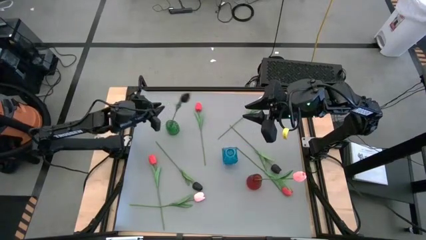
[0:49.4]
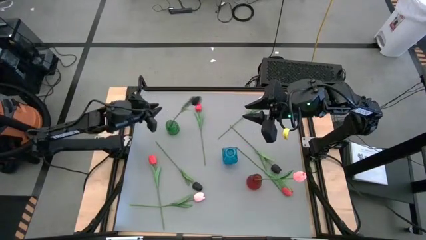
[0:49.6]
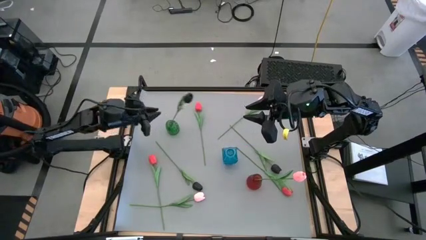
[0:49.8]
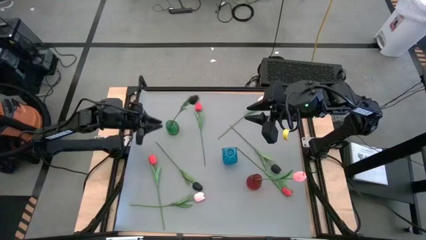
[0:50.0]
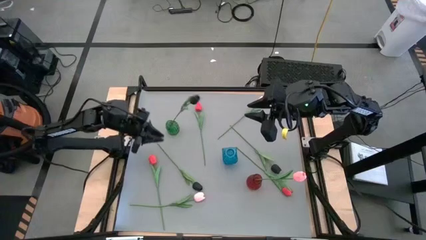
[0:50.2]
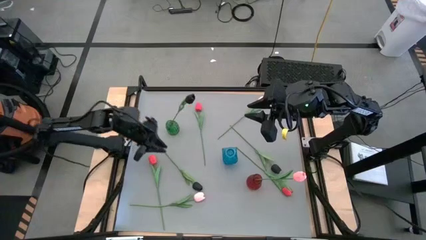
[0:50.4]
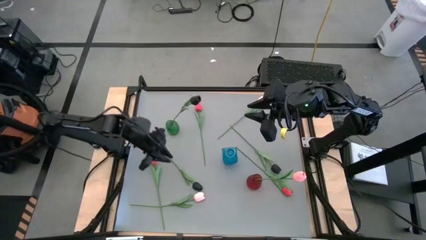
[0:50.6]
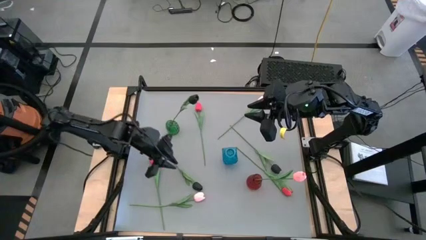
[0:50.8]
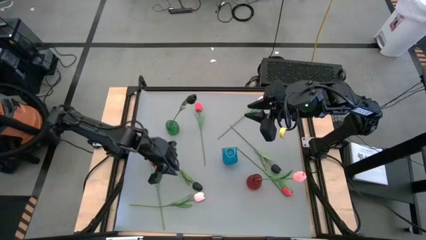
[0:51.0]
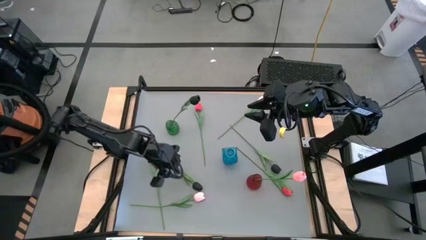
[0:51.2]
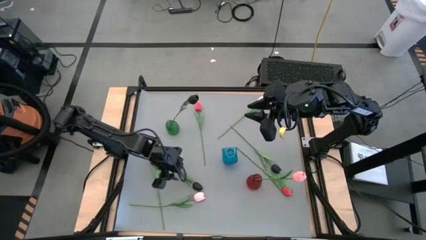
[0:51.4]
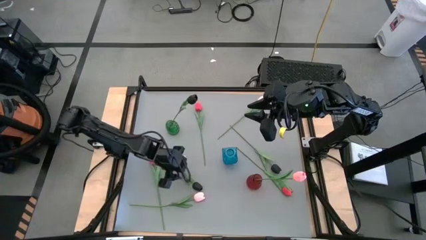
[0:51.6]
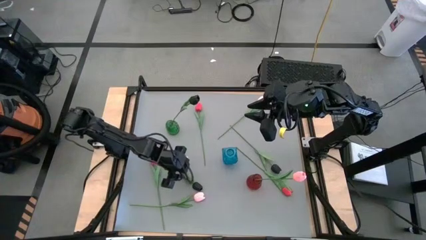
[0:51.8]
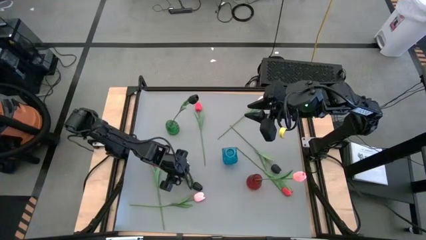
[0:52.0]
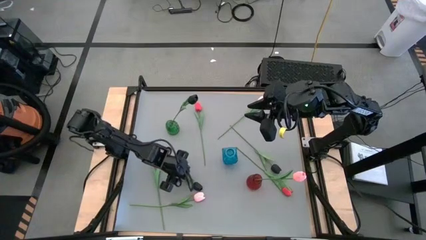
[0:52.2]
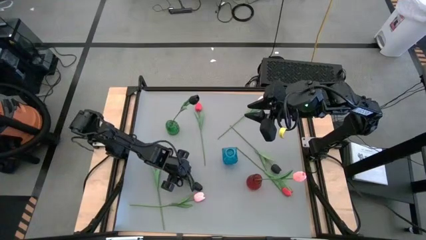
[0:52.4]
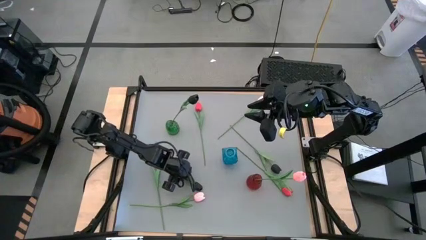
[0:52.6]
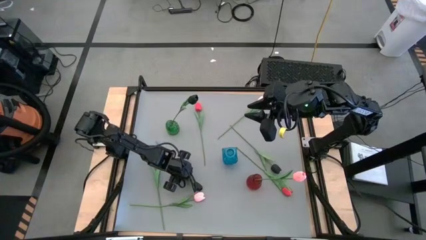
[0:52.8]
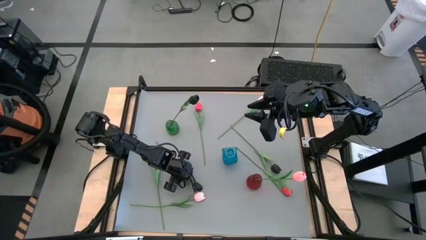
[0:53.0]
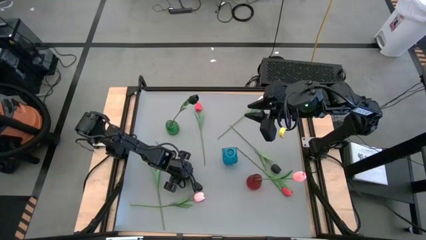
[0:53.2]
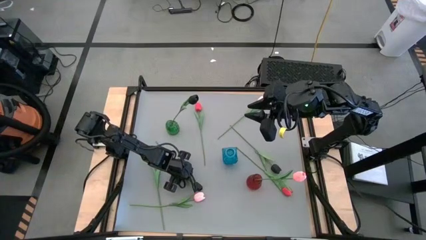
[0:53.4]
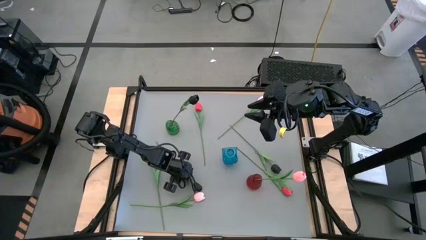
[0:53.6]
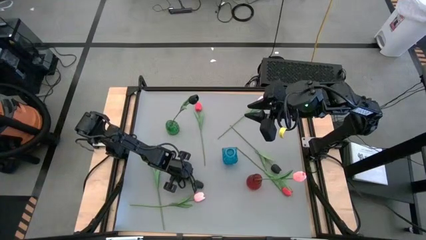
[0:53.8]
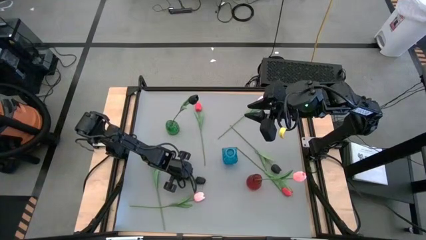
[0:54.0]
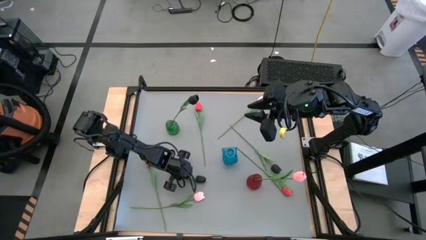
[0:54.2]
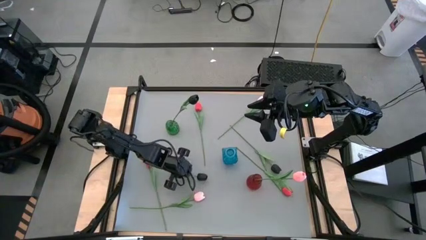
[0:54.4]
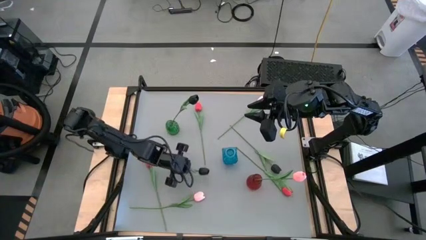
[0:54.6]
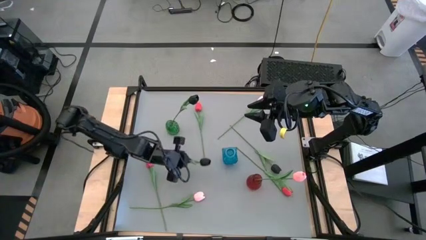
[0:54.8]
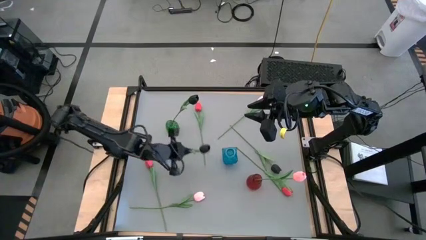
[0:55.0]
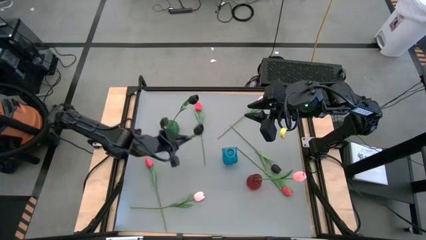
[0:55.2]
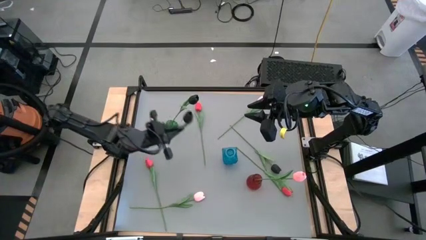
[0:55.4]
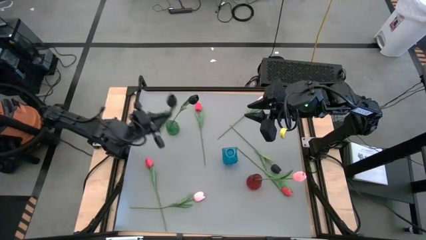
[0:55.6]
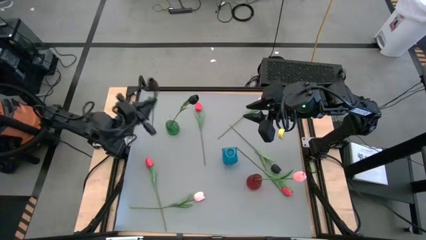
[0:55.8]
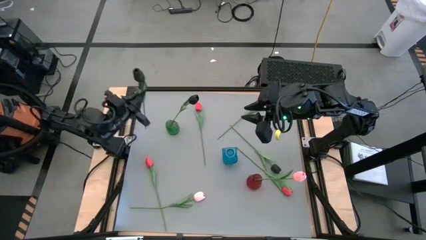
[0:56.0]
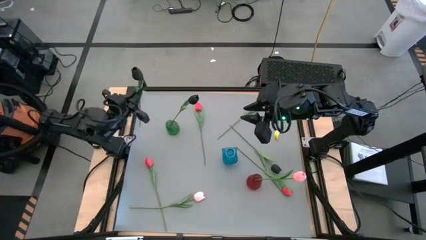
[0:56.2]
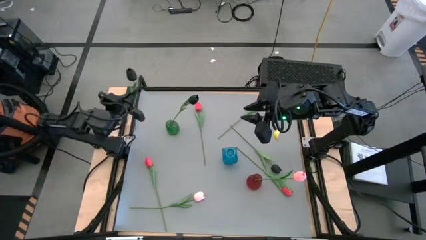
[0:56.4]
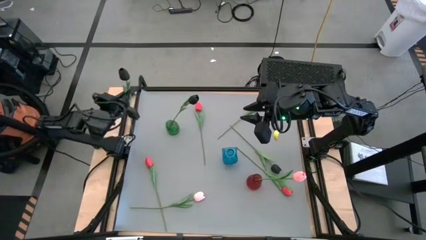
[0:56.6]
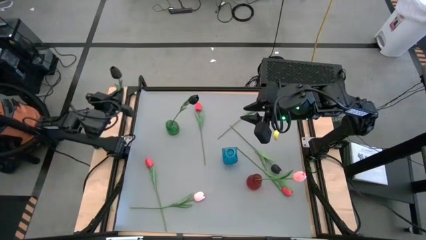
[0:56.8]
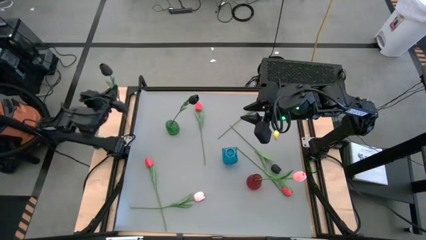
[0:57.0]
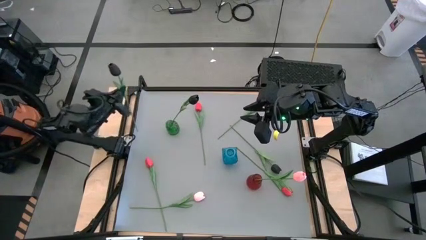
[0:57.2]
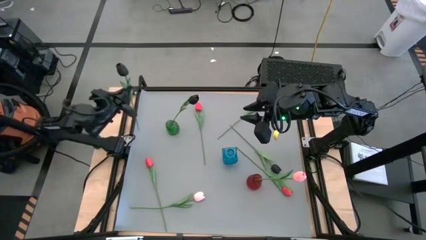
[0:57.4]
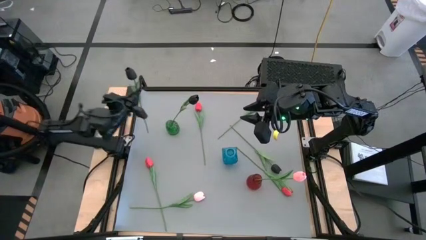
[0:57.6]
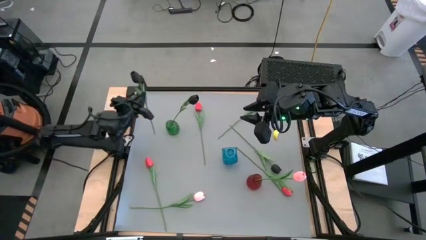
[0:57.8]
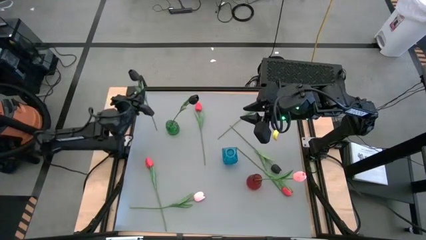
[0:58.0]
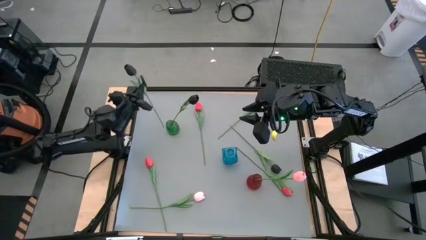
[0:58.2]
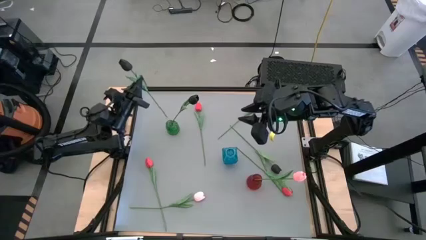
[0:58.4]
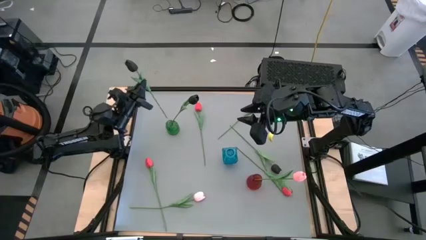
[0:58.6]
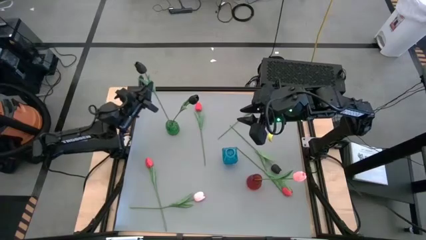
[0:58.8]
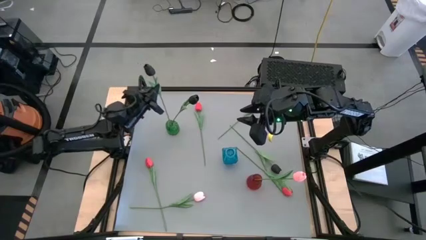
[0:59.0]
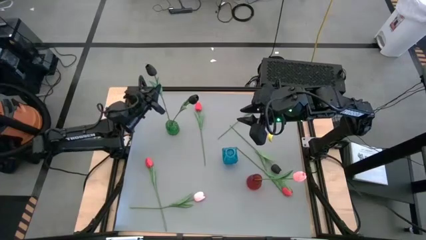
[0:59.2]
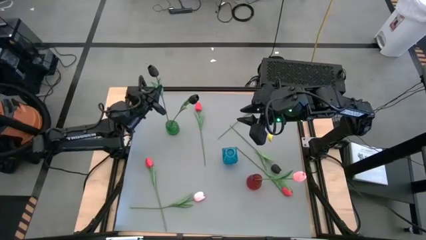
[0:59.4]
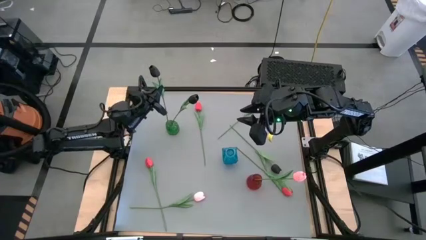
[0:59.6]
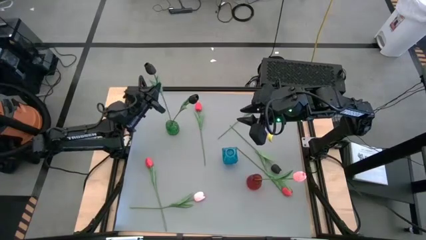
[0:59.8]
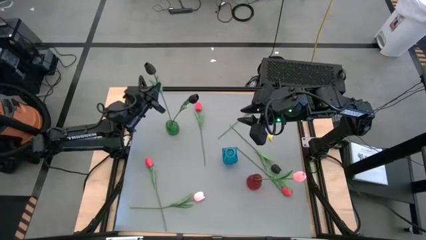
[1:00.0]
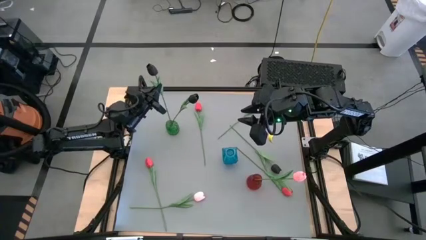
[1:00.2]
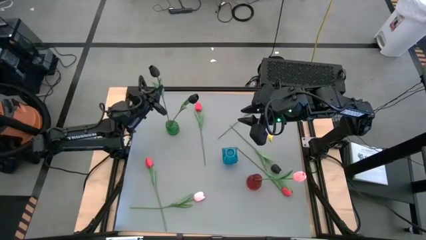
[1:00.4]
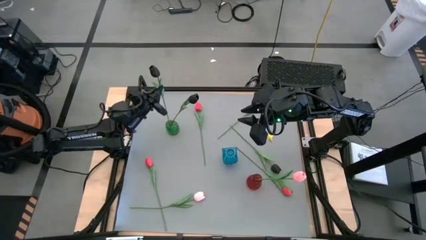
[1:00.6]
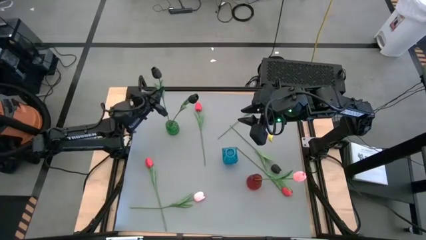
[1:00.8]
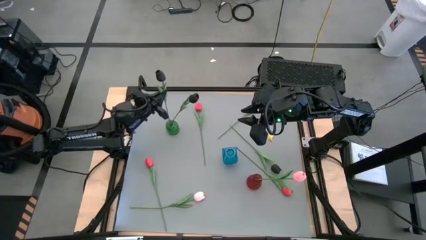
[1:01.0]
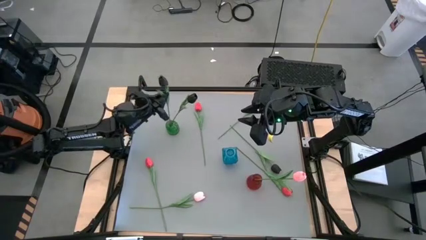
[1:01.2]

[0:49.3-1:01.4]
Task: Sort flowers into vase by color
Put the left black tulip into the green vase
